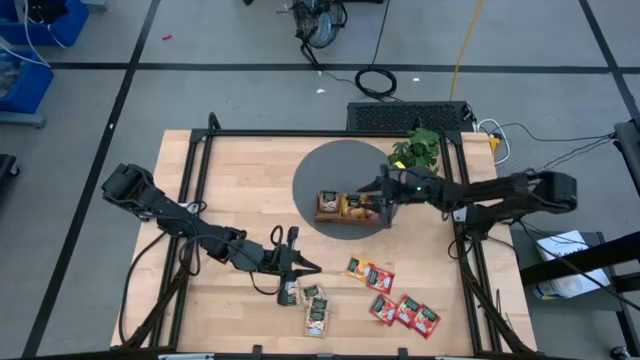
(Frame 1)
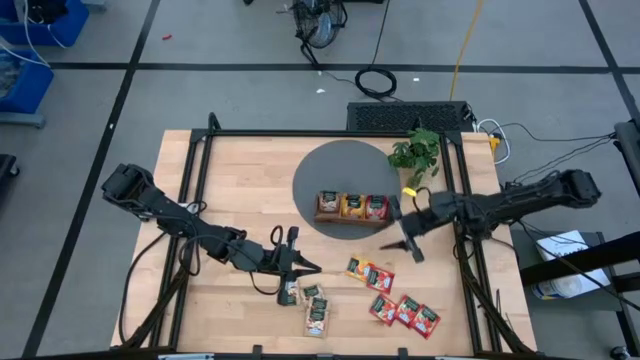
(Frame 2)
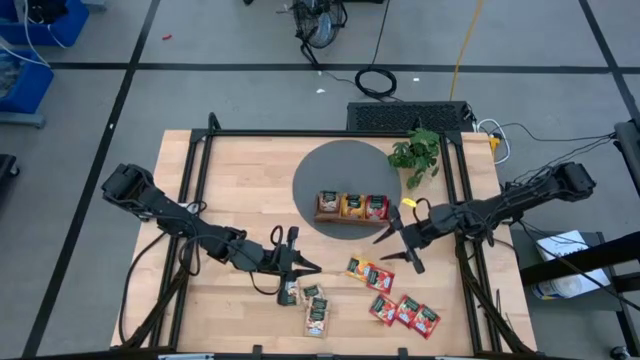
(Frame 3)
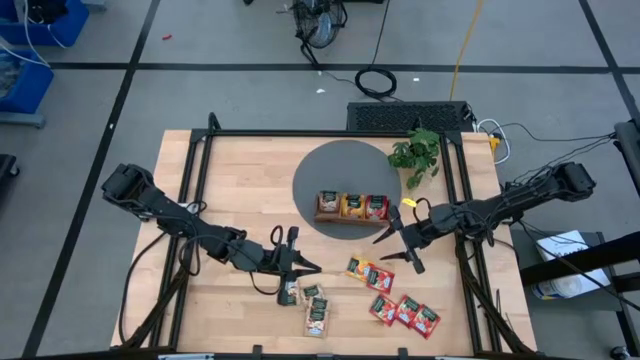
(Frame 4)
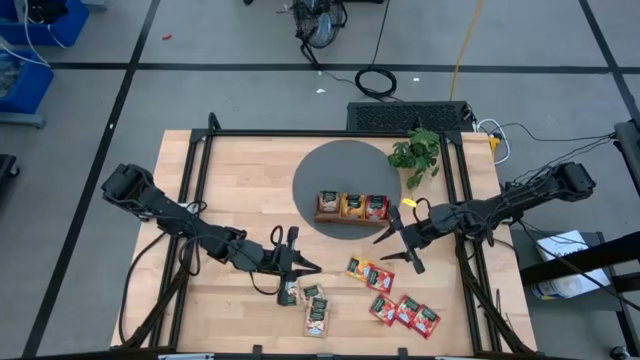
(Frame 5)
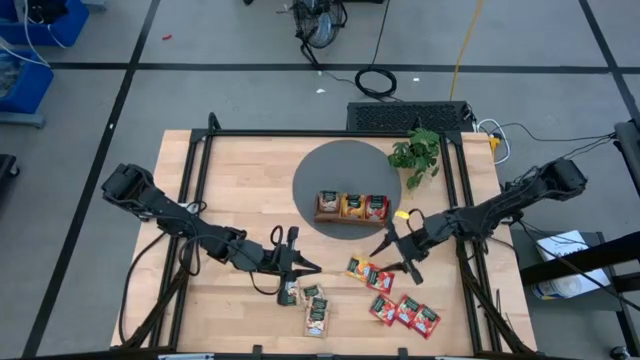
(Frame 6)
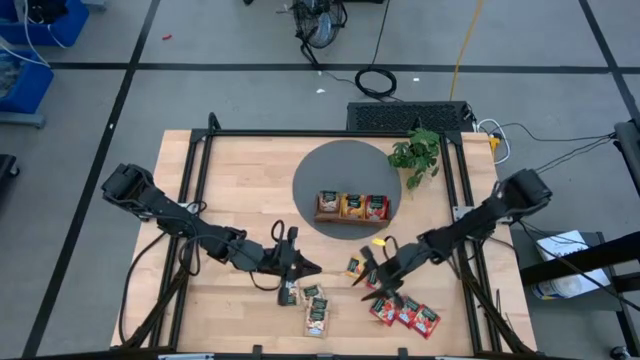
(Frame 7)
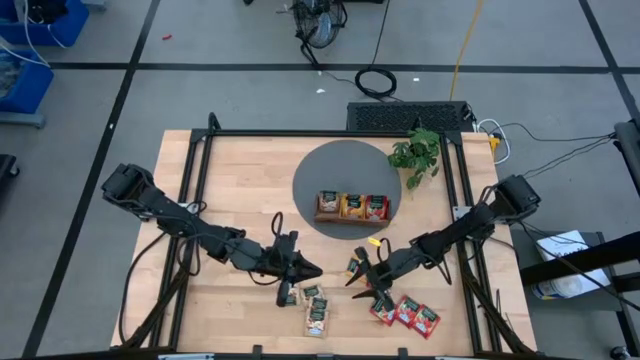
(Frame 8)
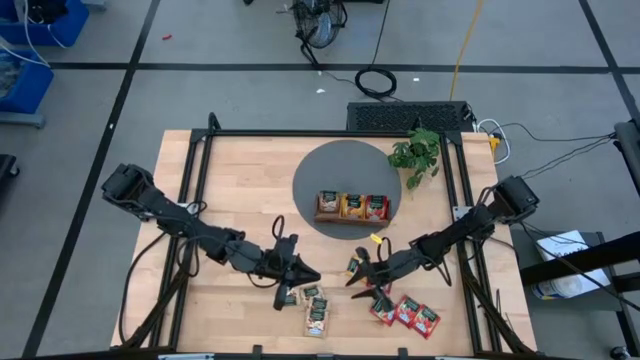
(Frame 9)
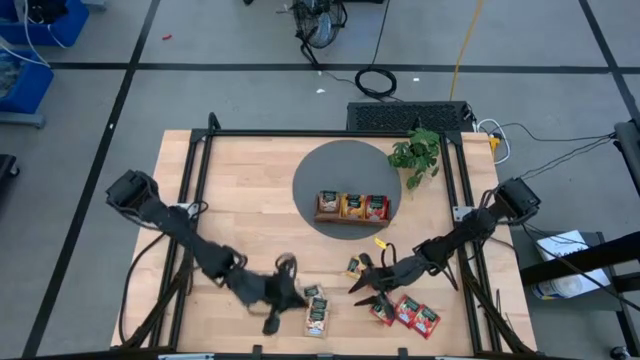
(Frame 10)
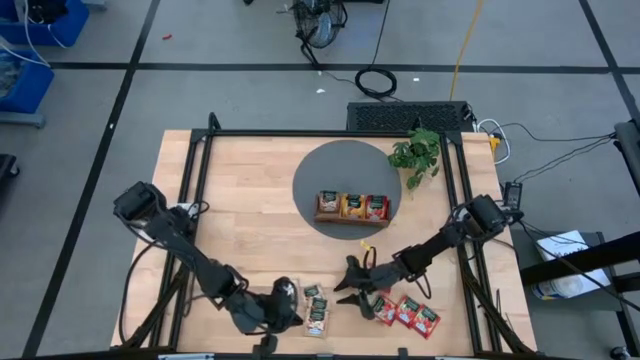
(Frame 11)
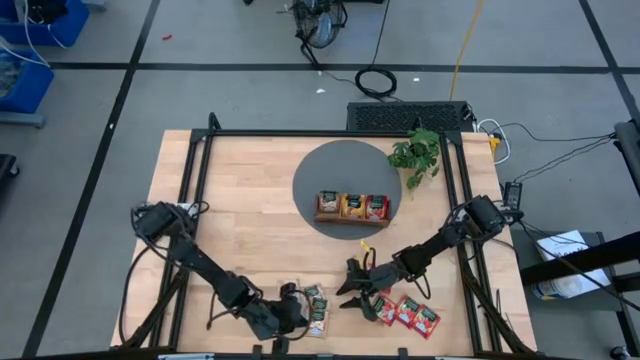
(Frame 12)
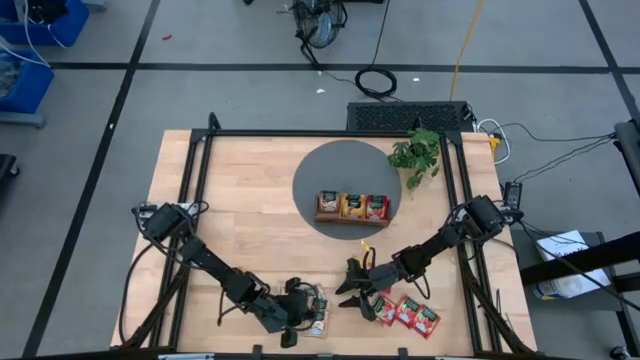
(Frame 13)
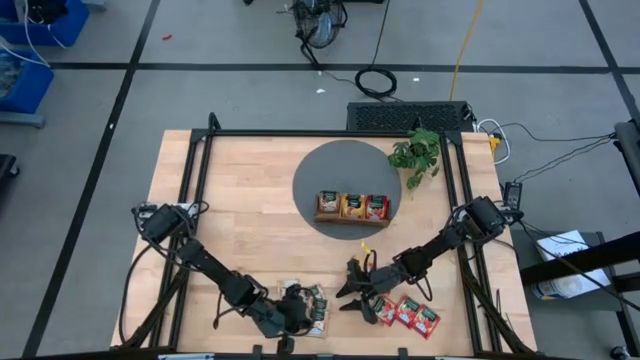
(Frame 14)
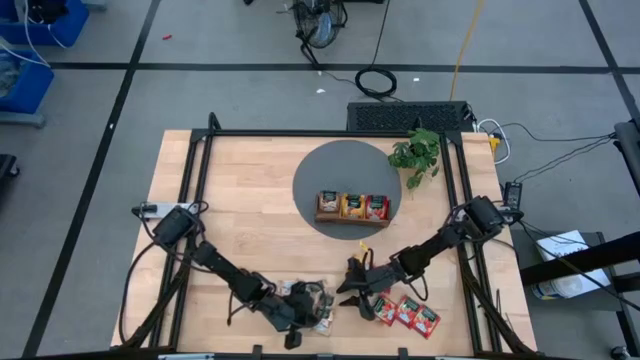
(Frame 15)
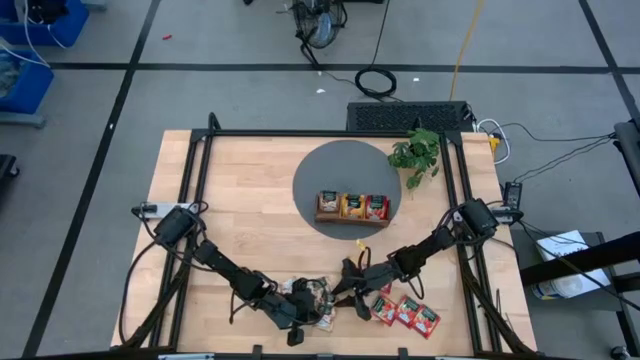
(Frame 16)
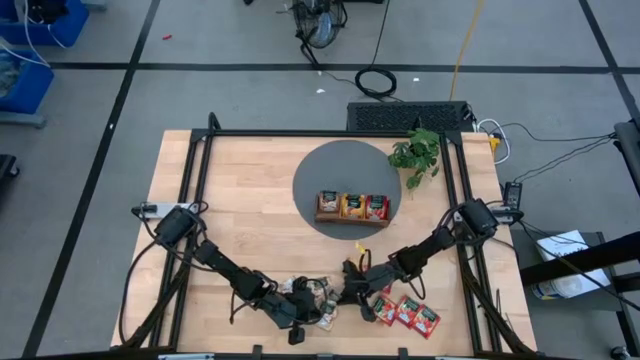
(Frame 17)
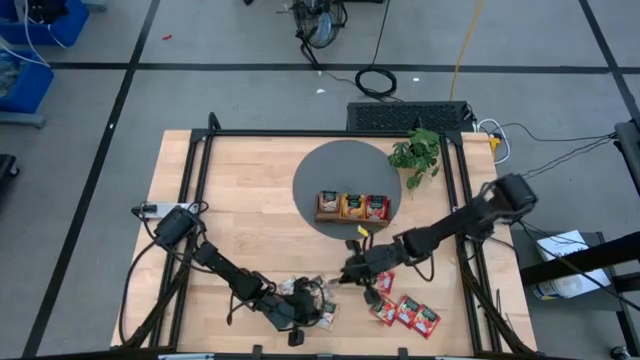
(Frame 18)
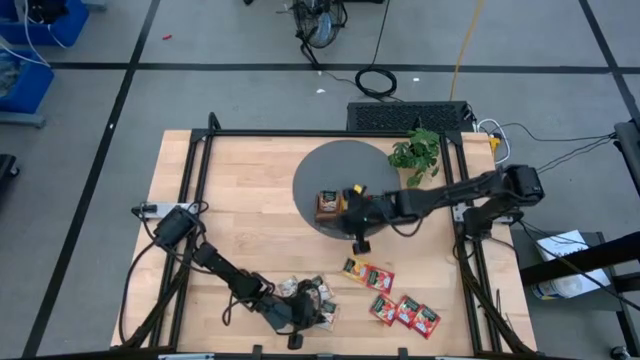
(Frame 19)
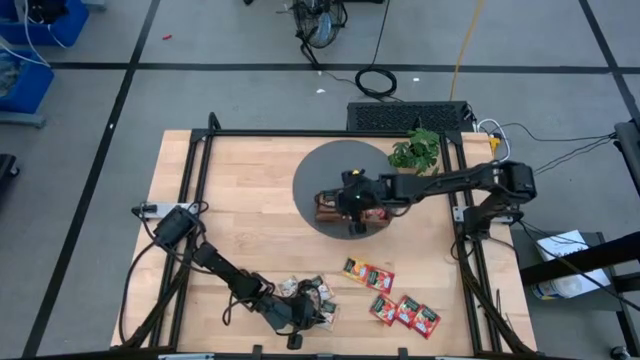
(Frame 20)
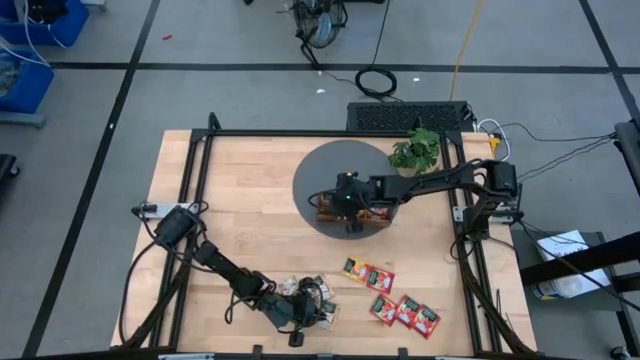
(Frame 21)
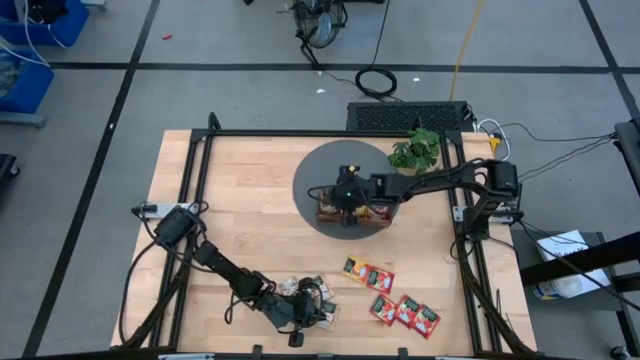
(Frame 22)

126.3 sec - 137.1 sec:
Task: Pick & Place Tea
Put the brown tea bag into the left section of the wooden organiser

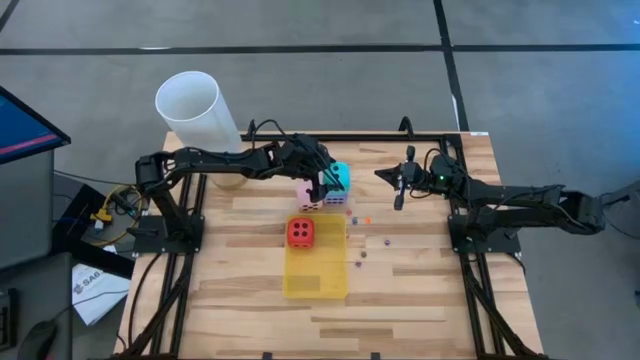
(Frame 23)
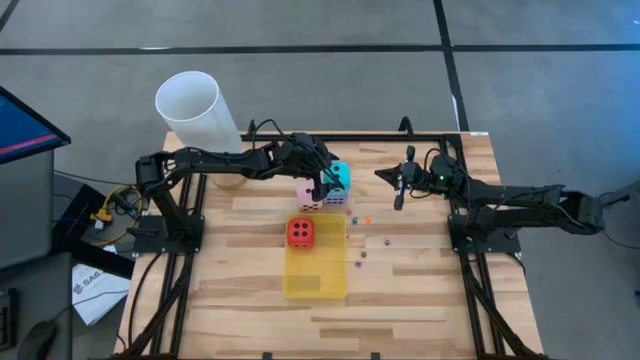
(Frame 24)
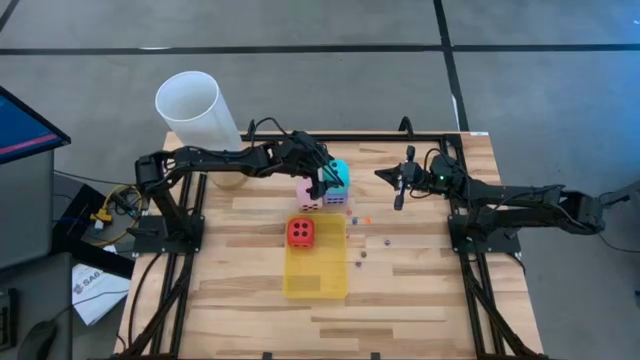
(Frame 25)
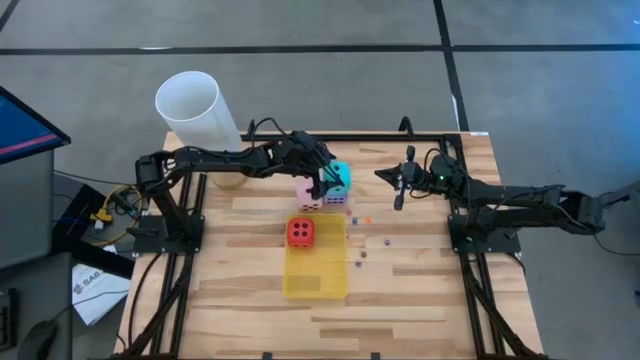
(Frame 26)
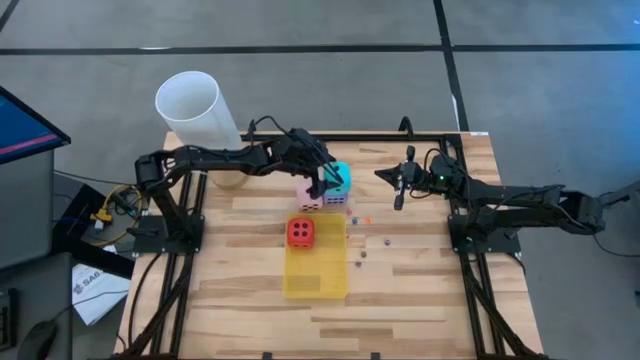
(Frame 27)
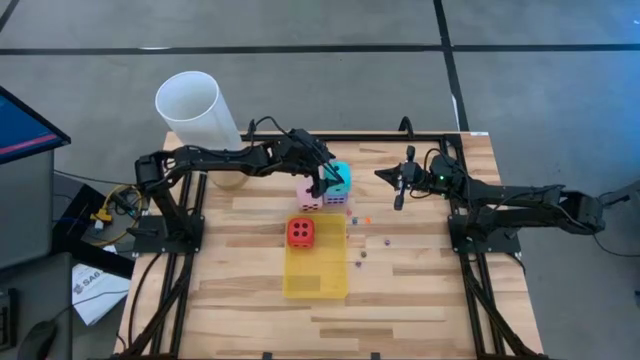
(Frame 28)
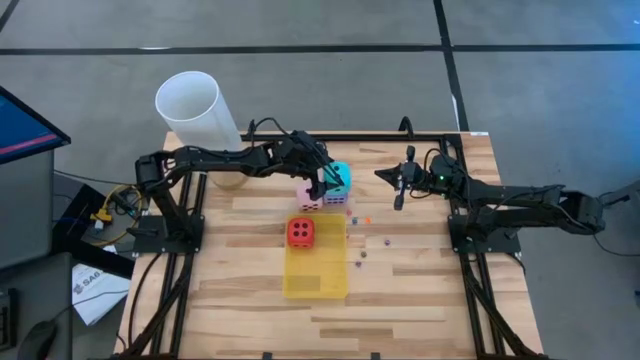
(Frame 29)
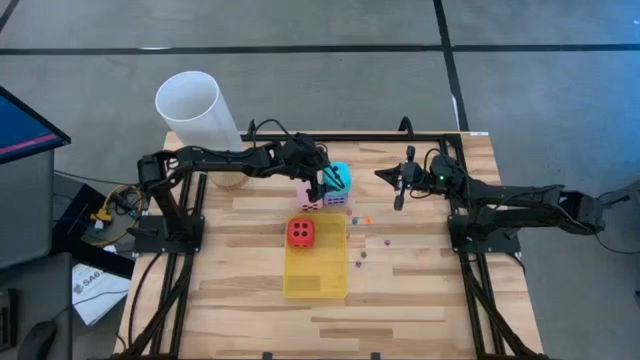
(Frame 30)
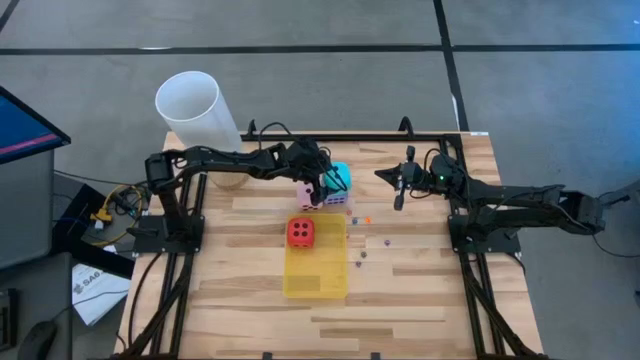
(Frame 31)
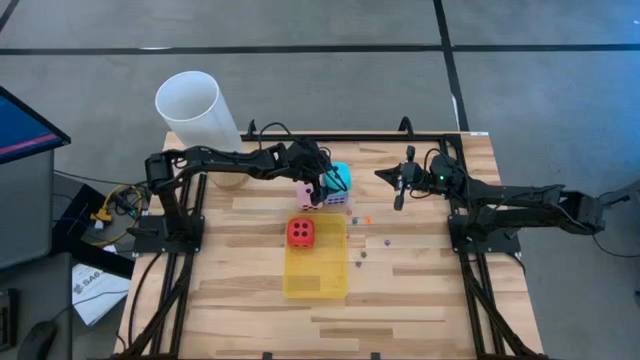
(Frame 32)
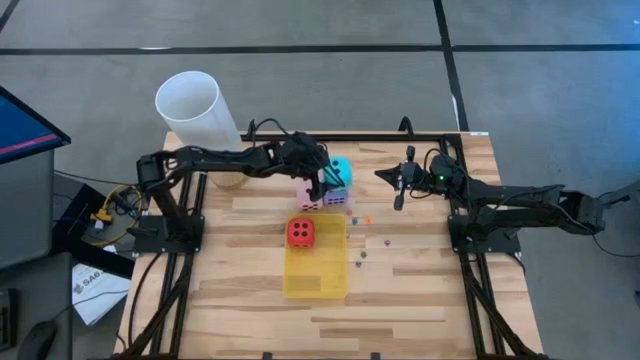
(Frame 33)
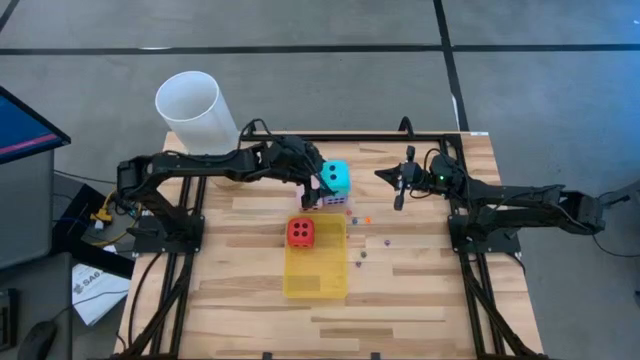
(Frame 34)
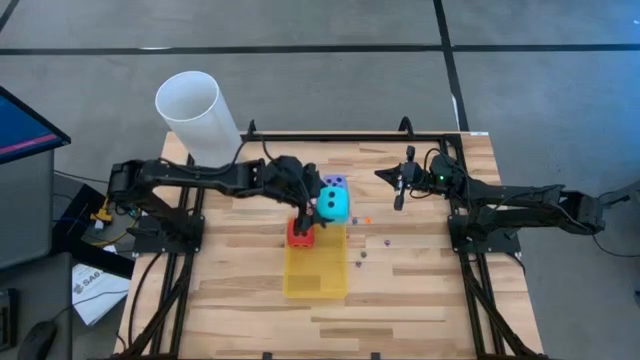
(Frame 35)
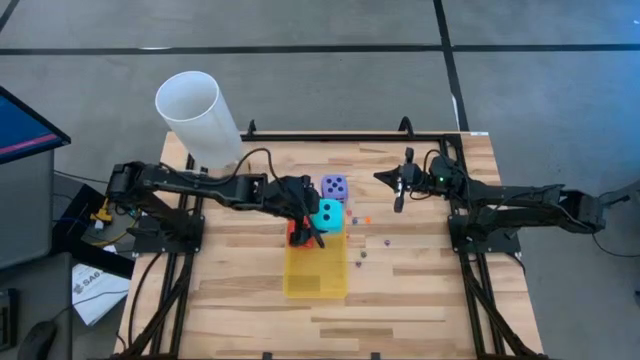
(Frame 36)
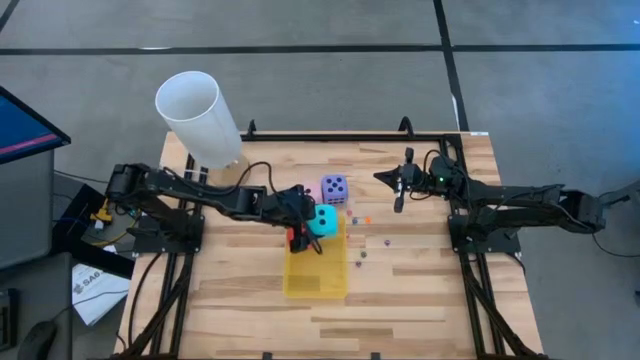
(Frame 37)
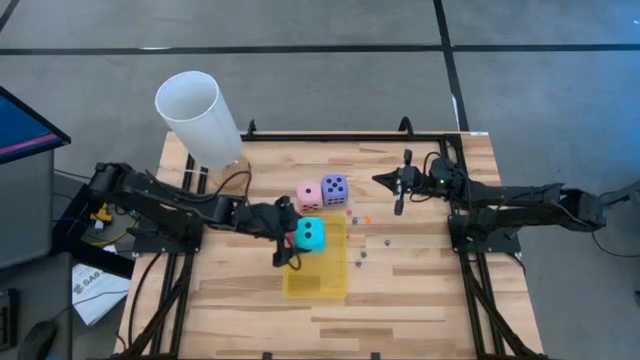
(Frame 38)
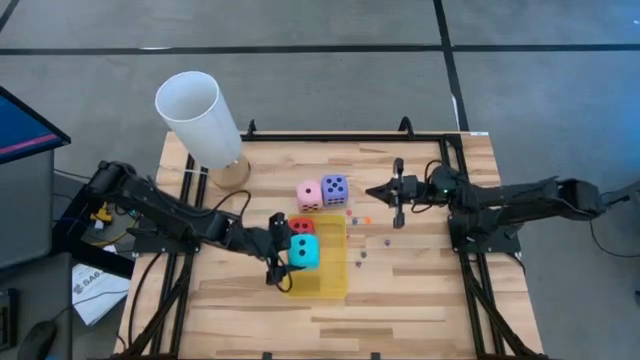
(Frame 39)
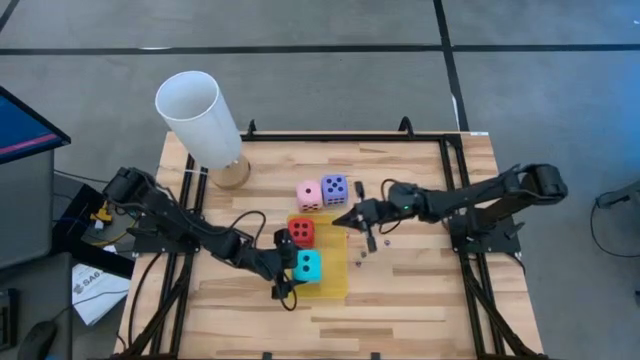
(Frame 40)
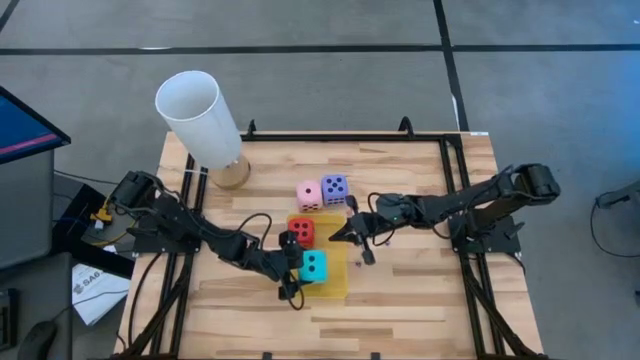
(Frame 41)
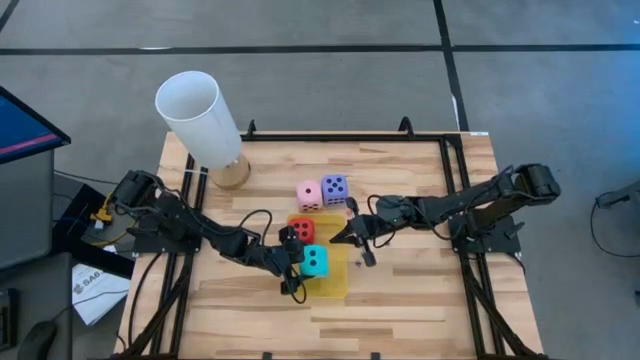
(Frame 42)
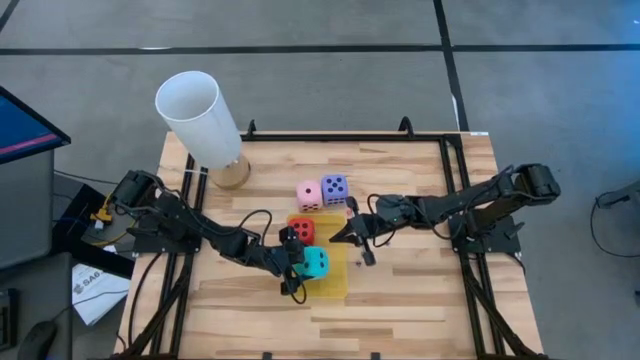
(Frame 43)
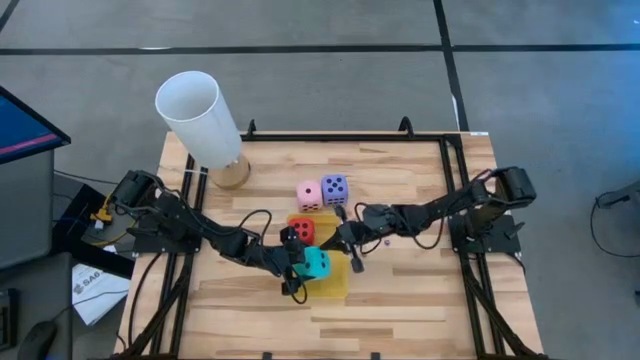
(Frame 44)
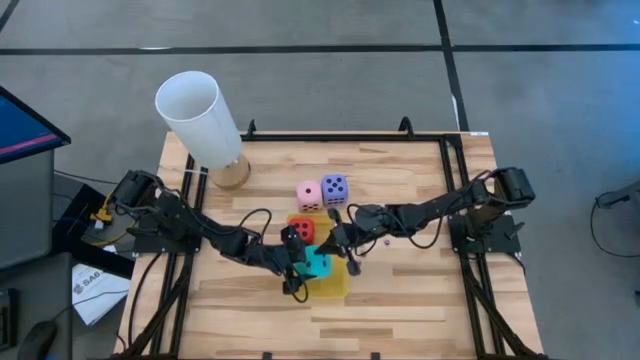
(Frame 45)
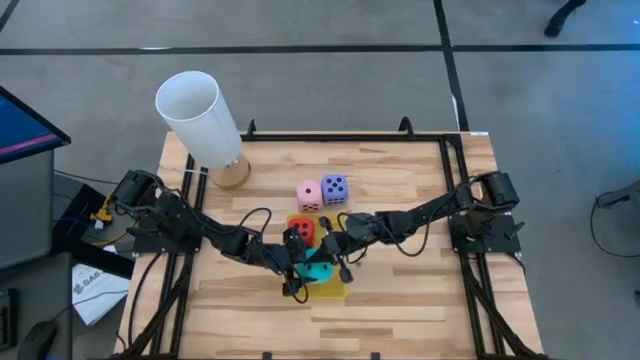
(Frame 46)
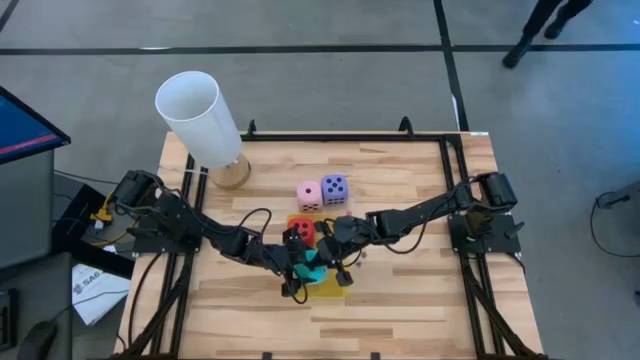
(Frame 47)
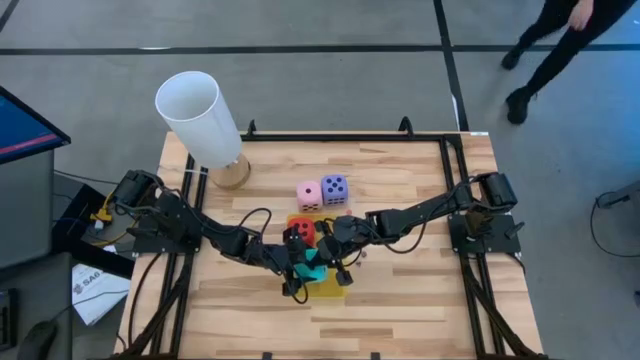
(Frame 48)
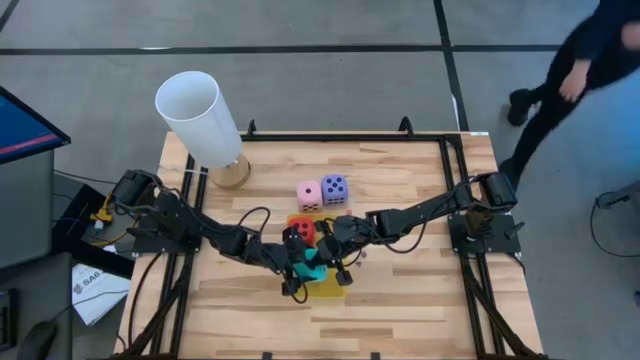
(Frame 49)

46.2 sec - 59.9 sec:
Task: Pick & Place Dice
Put the light blue die into the yellow bin
